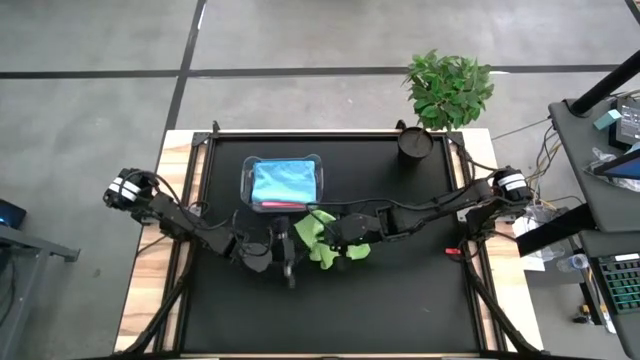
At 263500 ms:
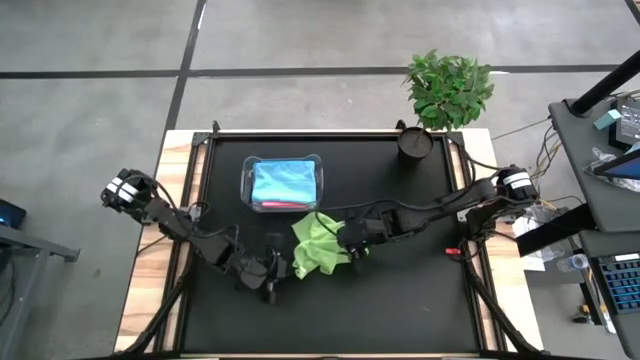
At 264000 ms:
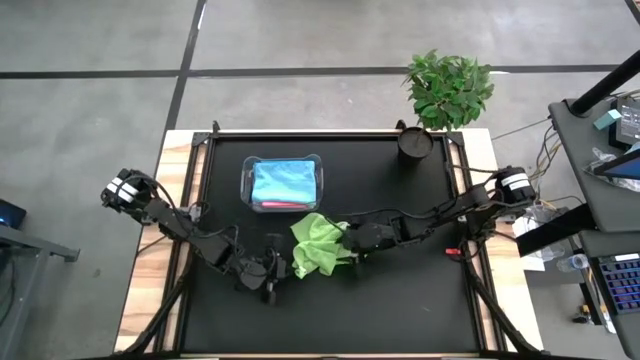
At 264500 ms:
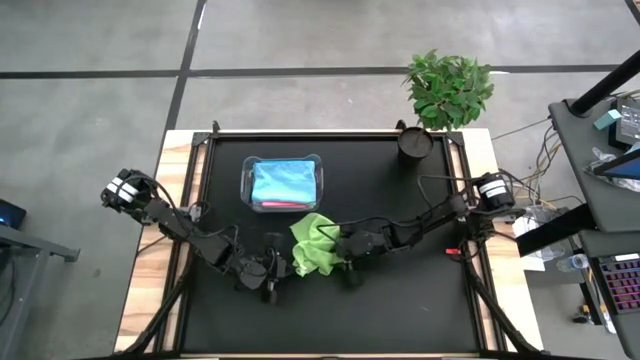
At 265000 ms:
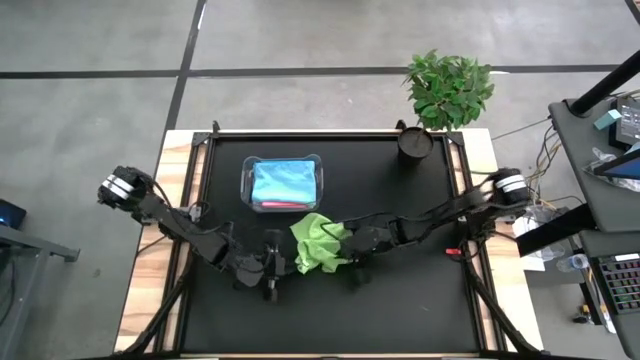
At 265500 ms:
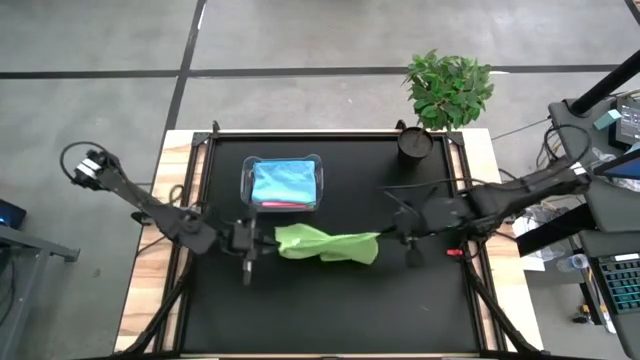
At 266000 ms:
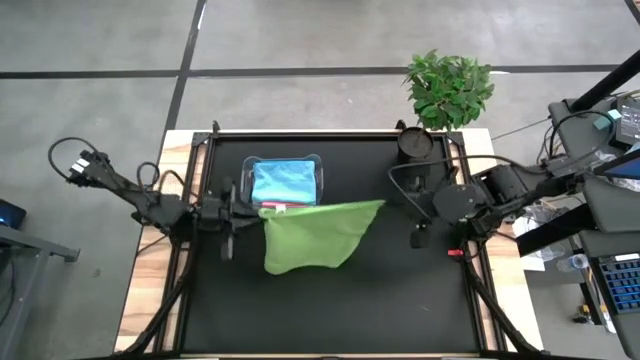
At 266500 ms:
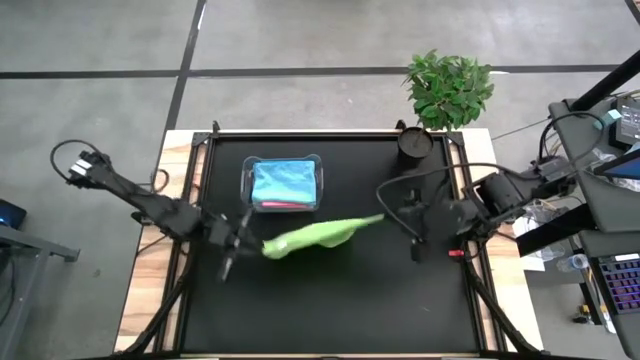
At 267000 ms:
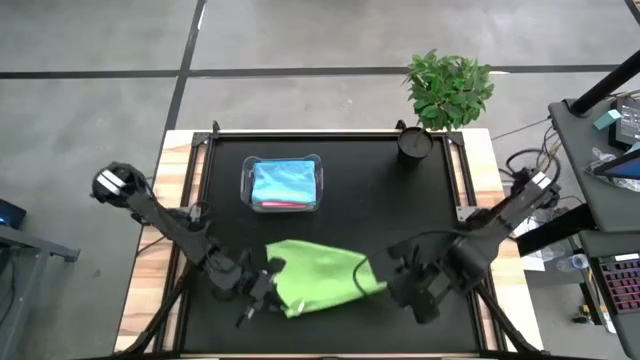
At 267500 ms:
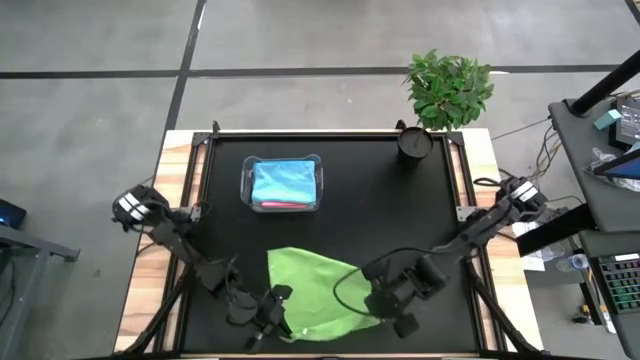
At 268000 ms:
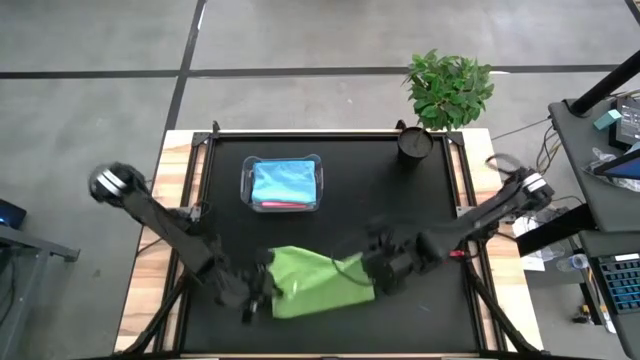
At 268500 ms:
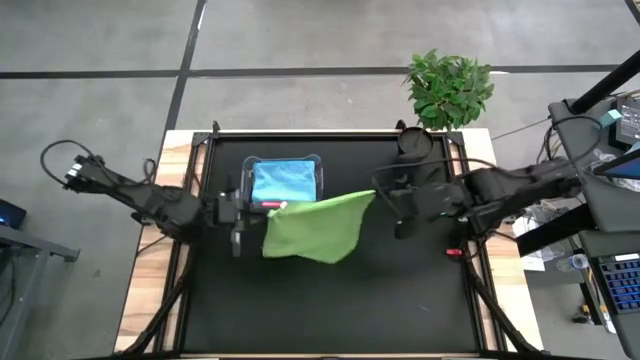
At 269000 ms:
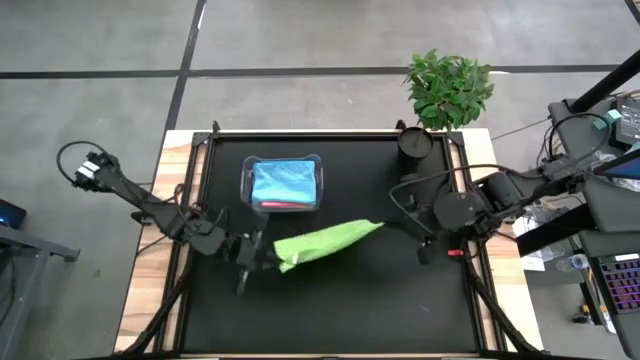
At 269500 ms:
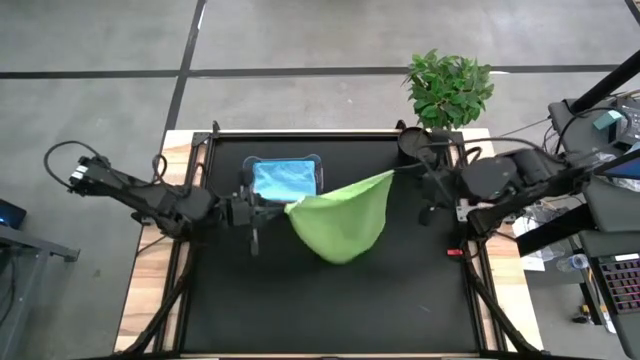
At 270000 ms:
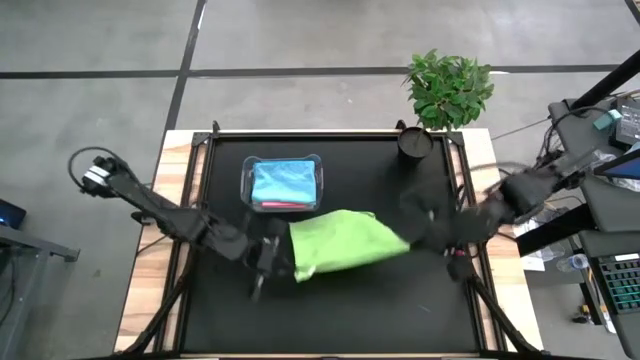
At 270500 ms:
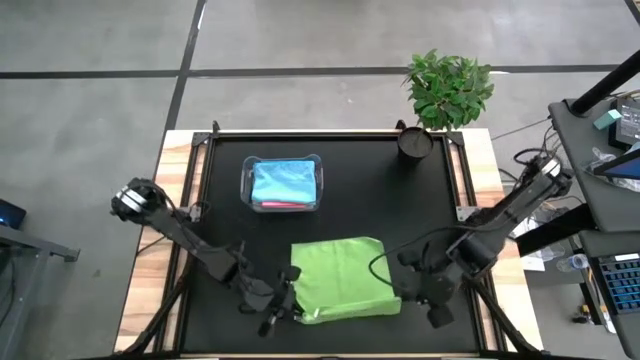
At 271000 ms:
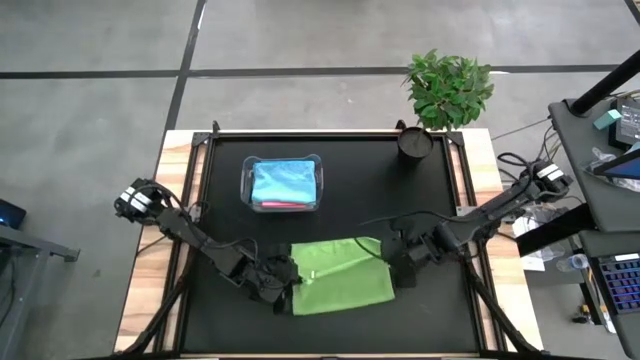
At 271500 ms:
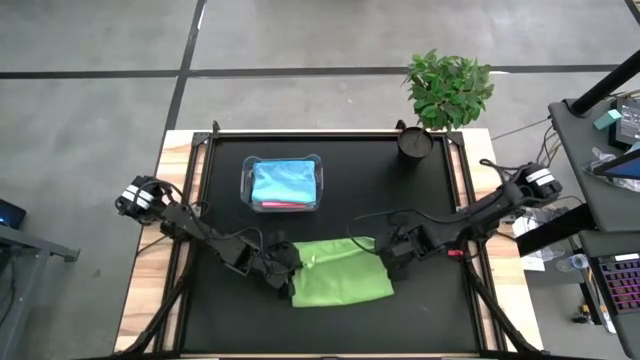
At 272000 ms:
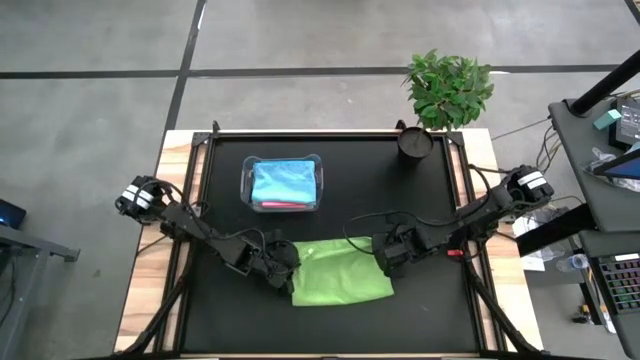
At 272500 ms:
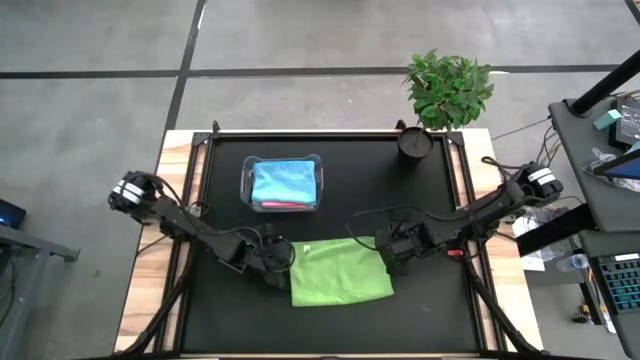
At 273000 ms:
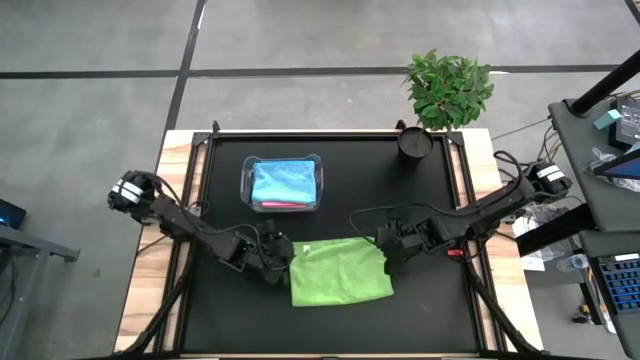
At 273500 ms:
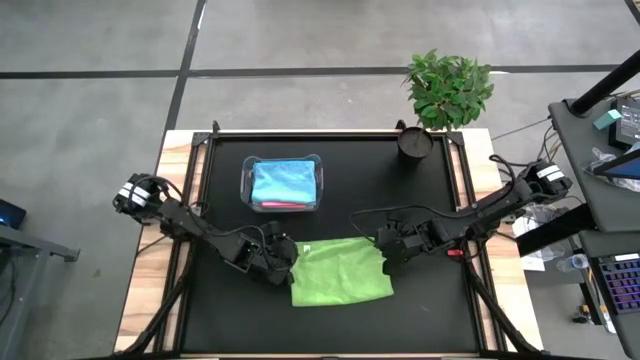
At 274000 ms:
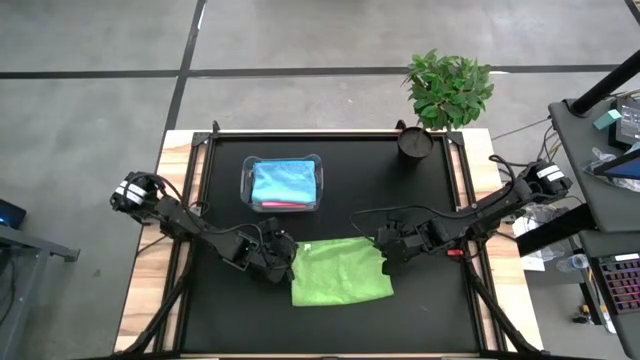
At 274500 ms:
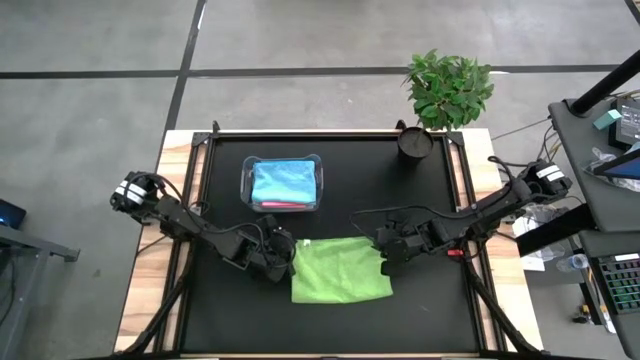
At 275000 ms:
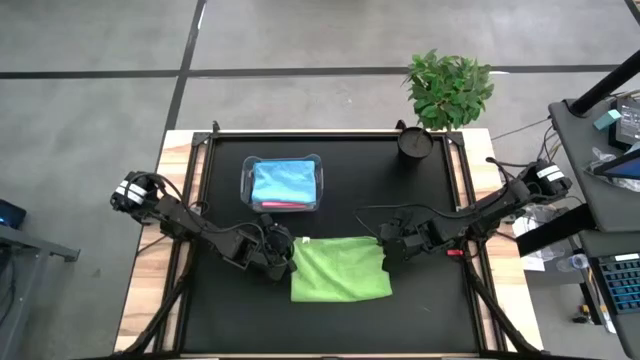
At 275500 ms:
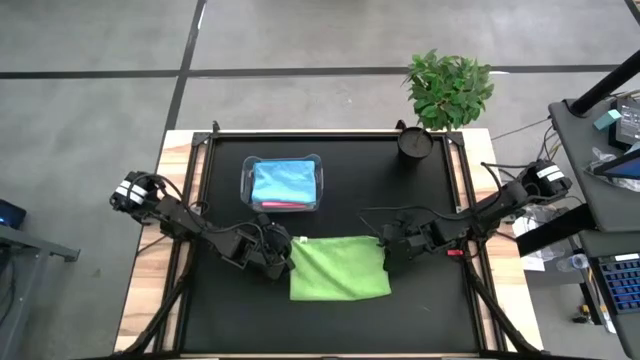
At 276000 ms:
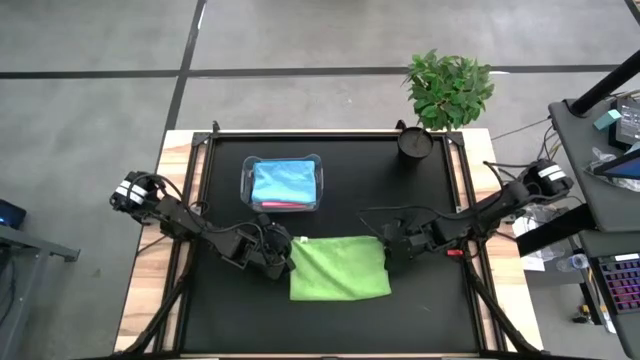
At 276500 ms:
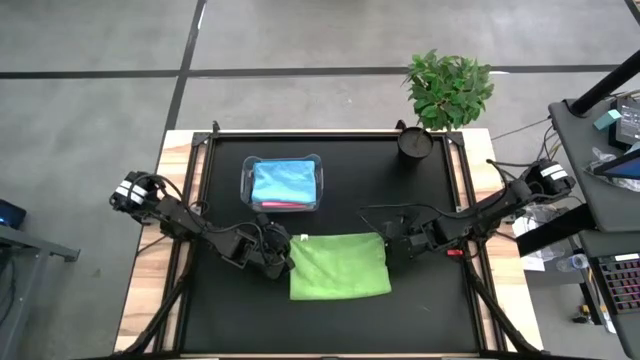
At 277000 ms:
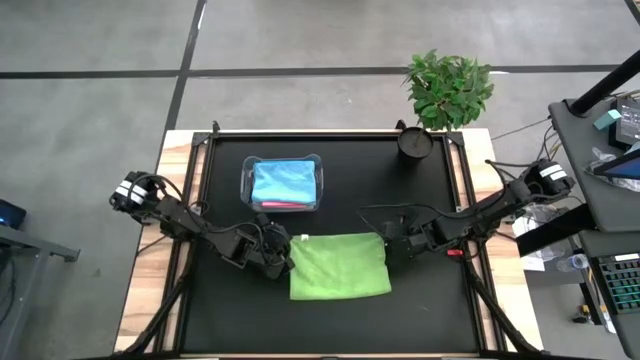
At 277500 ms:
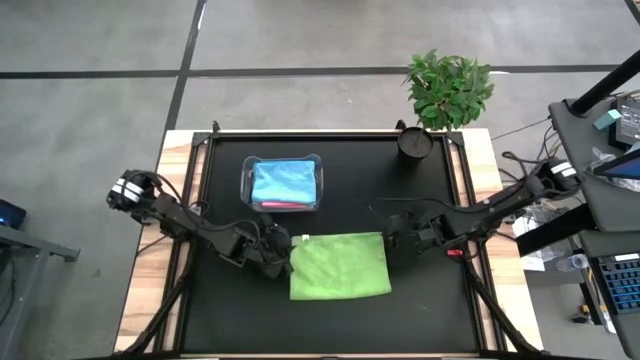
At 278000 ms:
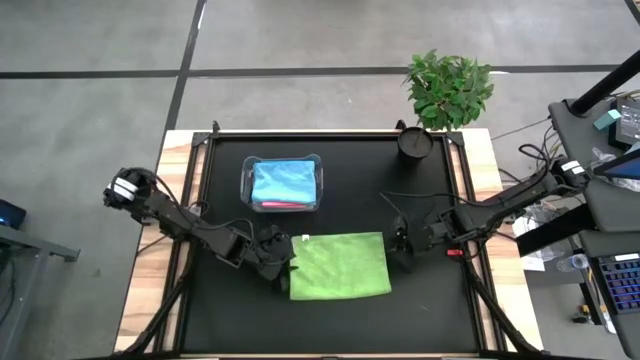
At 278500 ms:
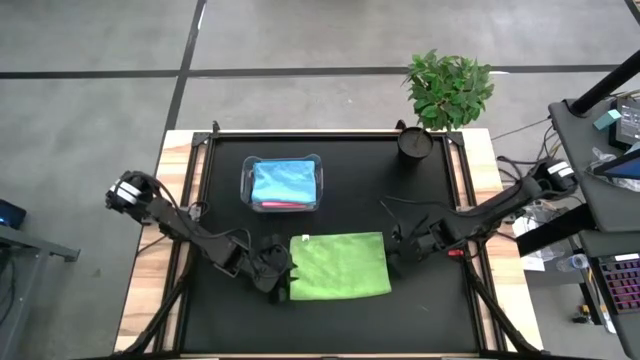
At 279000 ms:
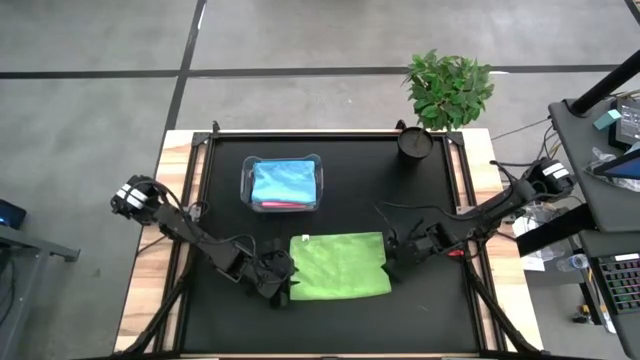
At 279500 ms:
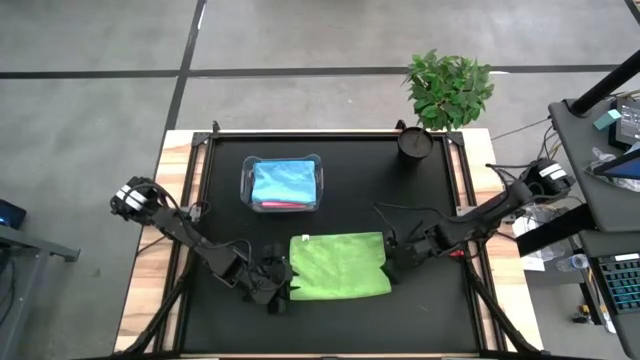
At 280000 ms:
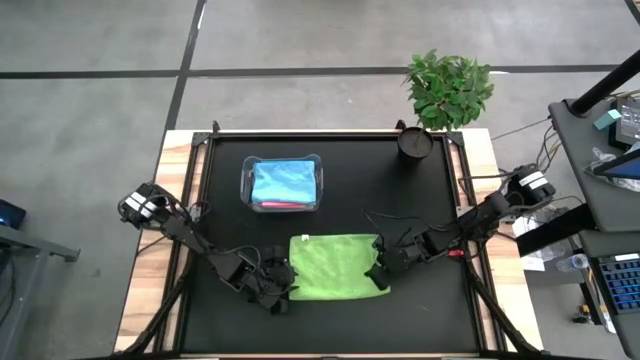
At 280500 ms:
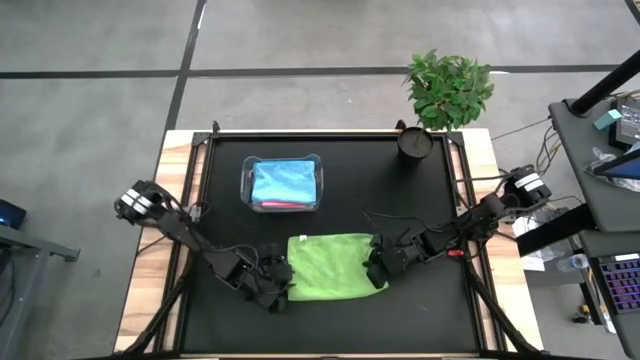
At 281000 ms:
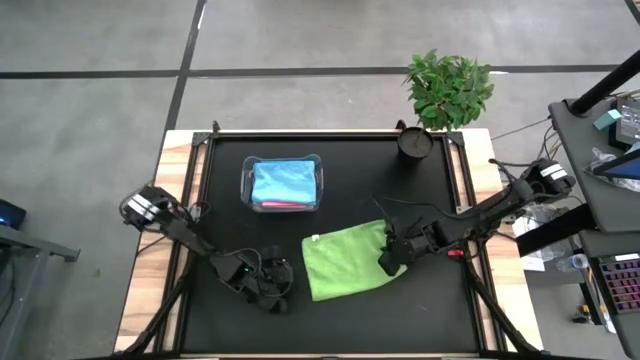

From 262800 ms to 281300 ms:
Task: Fold microfiber towels
Fold the green microfiber cloth

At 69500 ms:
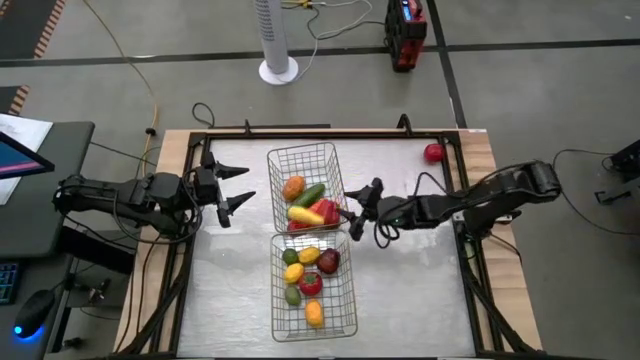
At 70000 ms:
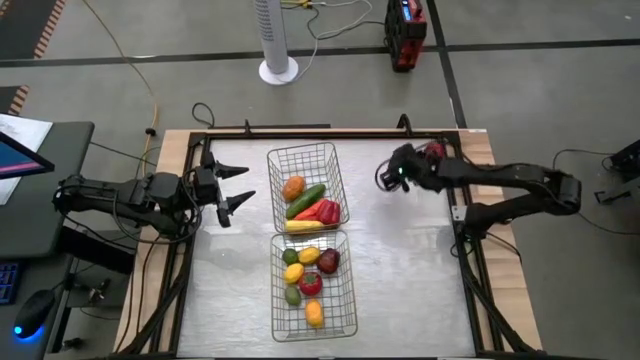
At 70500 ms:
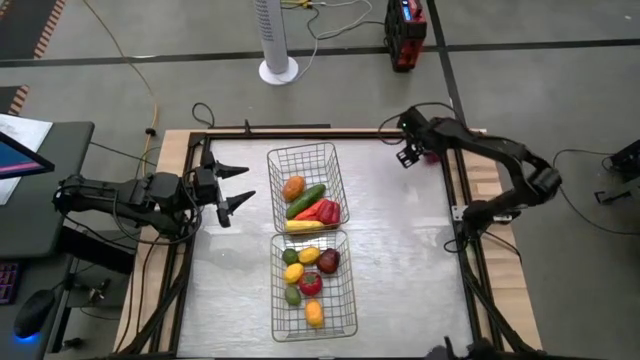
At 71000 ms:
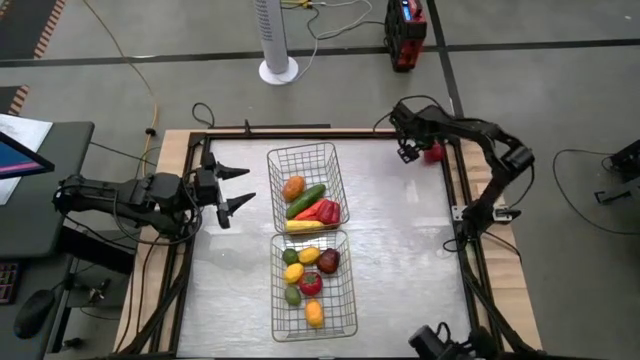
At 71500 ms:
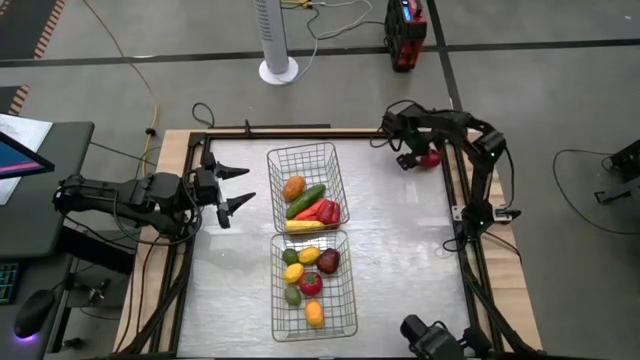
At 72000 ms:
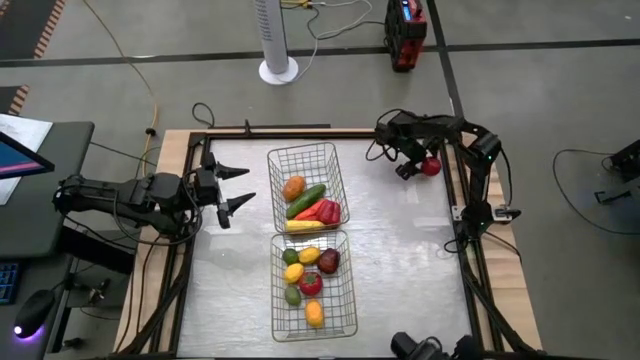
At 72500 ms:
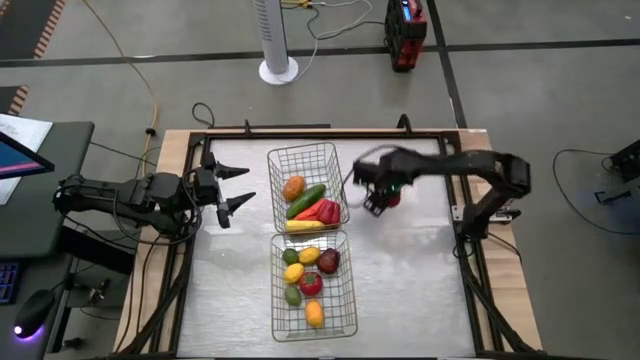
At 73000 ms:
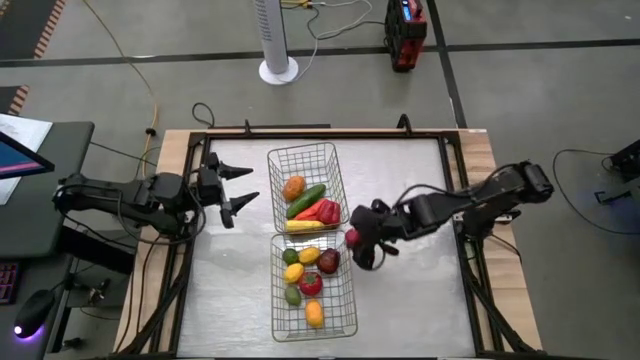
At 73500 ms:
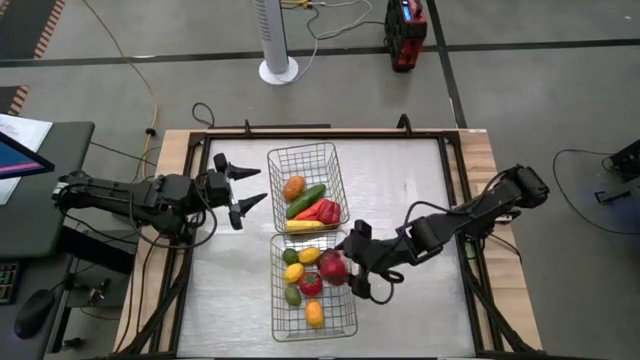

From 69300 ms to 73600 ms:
Task: Sort produce into baskets
Put the tomato into the bottom wire basket
